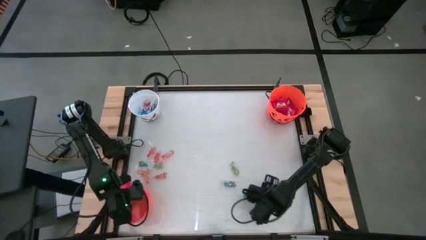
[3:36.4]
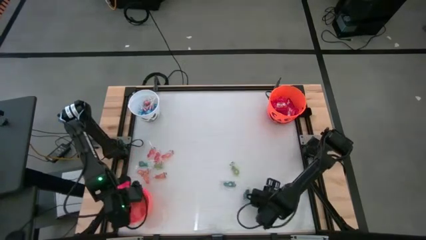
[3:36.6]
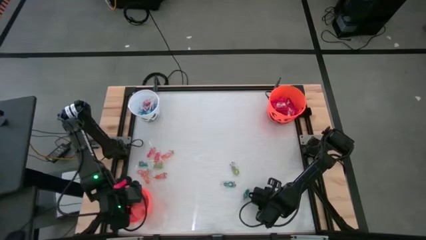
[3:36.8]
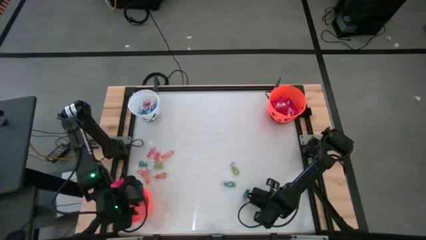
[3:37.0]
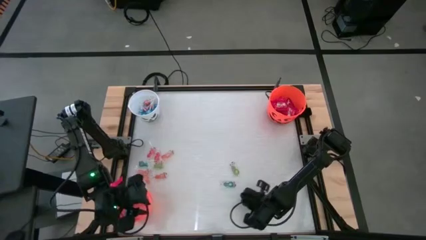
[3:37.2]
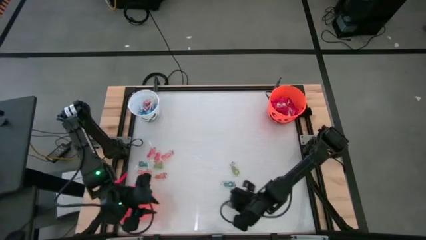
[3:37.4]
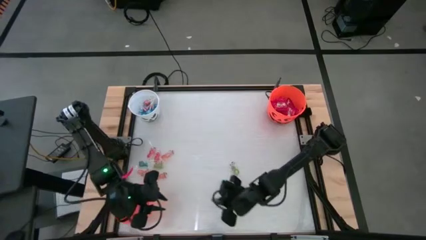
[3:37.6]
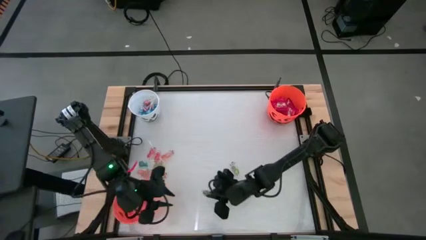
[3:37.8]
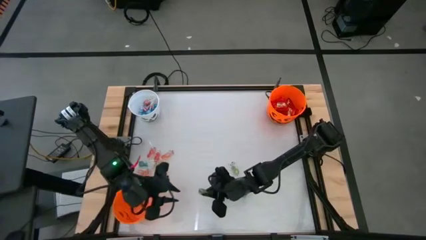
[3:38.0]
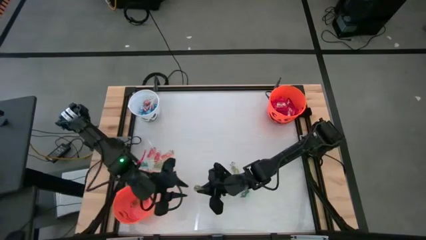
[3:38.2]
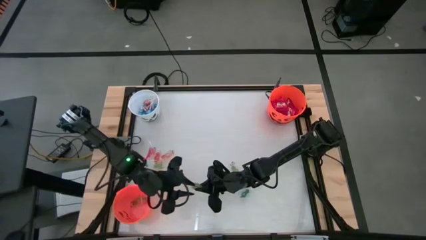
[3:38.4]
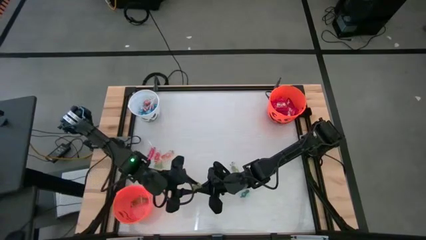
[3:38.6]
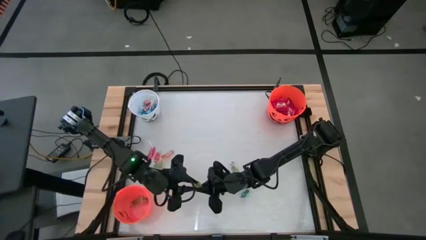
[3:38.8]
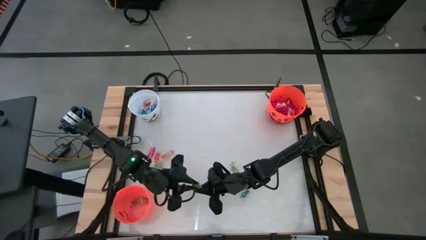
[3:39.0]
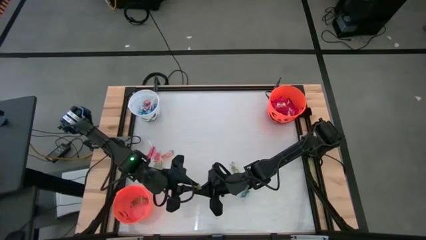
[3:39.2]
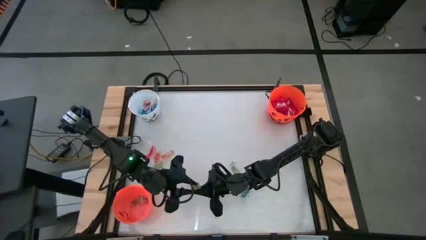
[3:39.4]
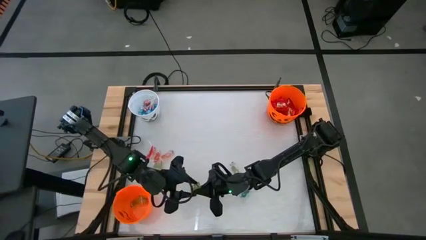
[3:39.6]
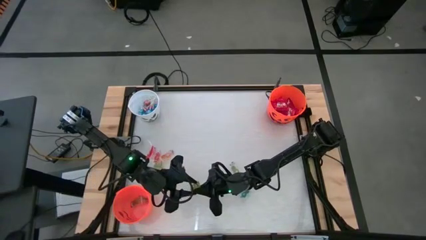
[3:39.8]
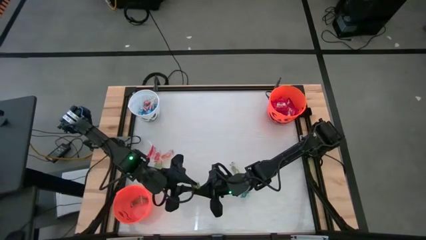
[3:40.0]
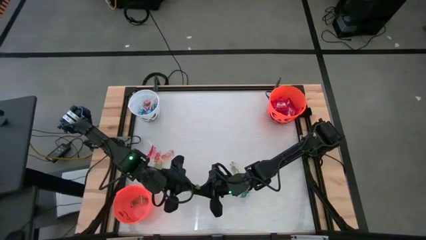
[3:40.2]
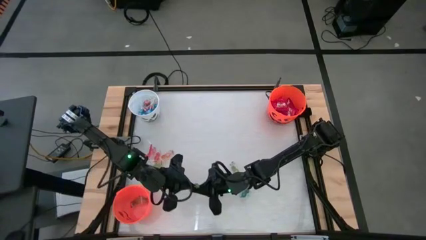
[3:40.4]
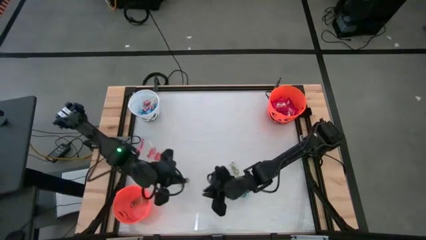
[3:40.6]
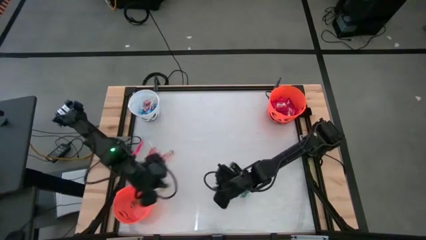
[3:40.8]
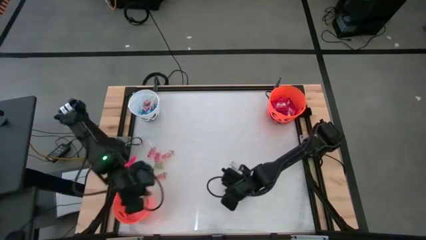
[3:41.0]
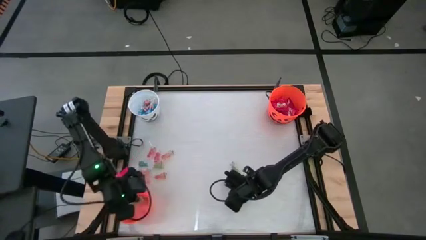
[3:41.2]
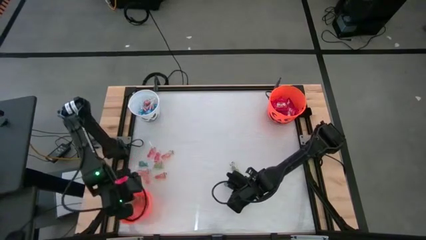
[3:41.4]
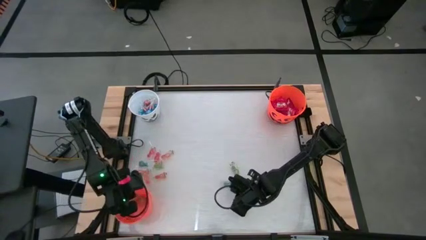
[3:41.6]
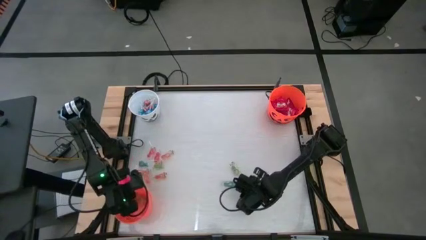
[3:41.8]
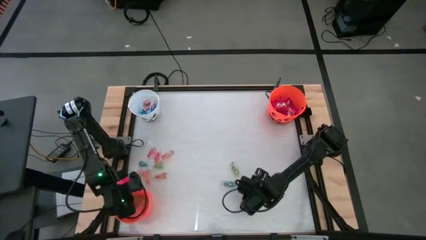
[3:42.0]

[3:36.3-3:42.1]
Task: Sort candy by brand, put in halloween buckets
Put the green gummy into the bottom orange bucket

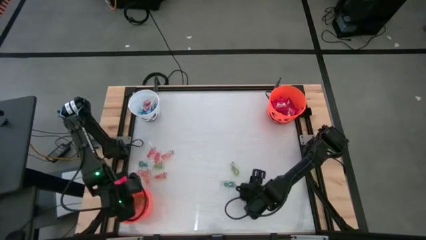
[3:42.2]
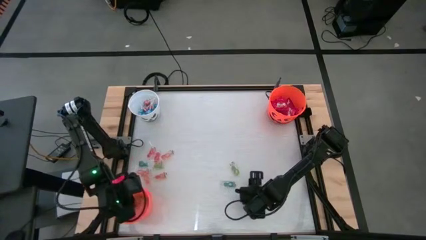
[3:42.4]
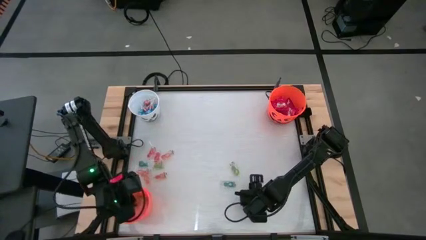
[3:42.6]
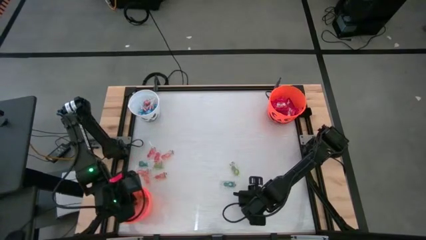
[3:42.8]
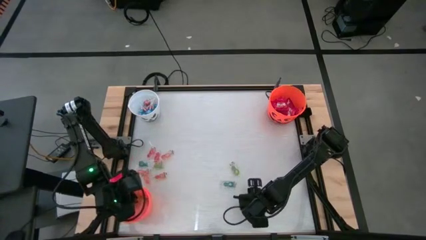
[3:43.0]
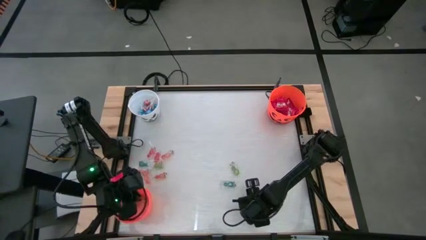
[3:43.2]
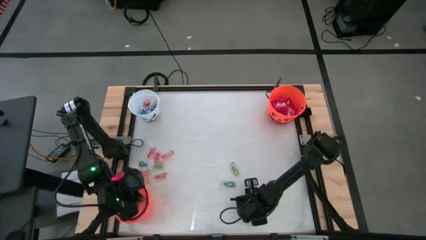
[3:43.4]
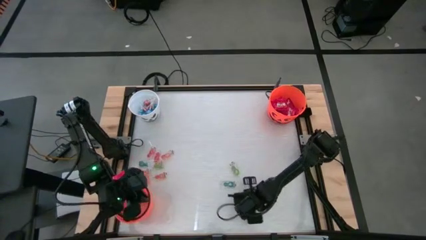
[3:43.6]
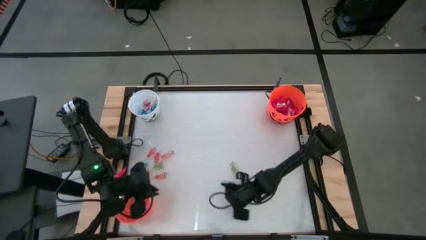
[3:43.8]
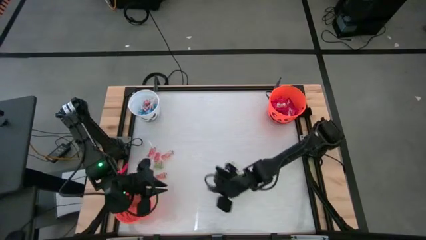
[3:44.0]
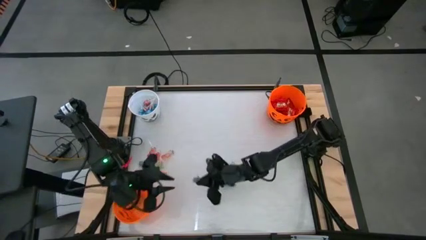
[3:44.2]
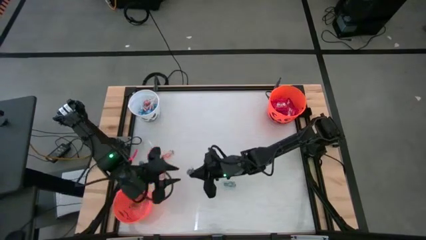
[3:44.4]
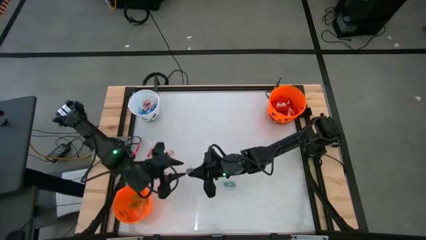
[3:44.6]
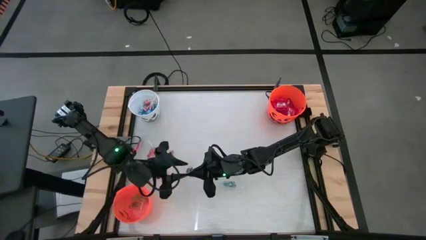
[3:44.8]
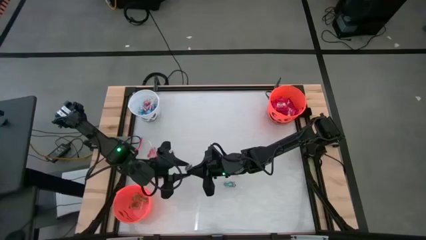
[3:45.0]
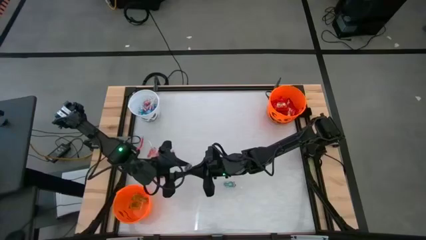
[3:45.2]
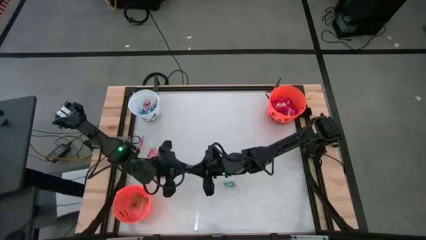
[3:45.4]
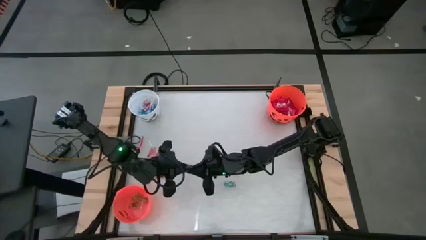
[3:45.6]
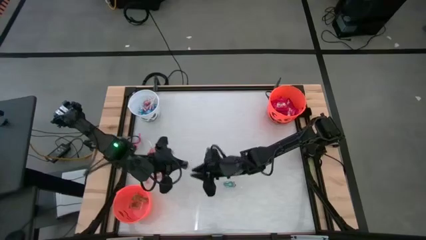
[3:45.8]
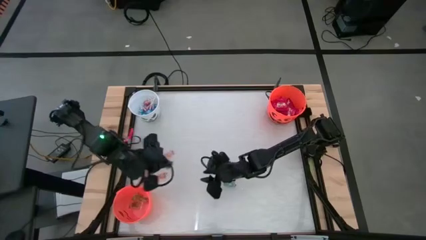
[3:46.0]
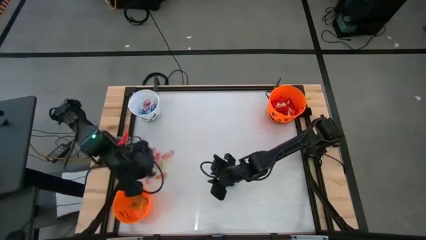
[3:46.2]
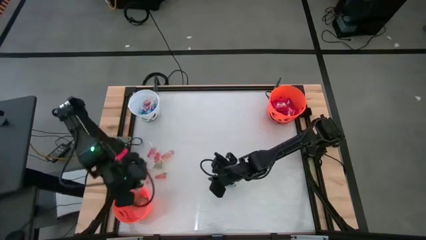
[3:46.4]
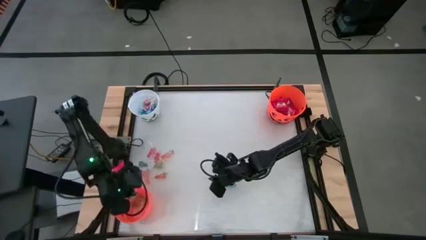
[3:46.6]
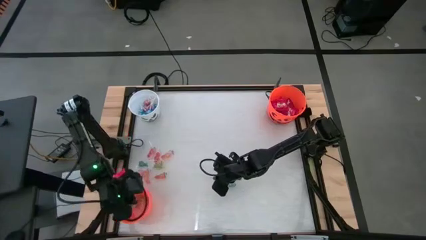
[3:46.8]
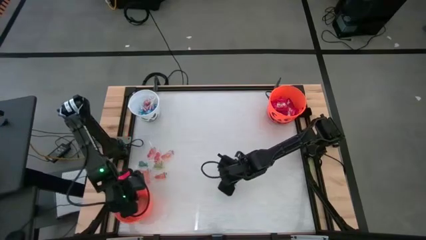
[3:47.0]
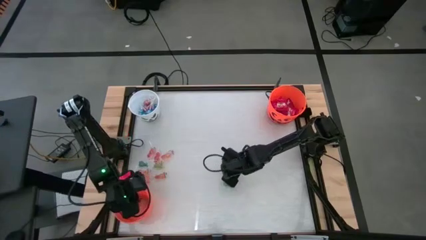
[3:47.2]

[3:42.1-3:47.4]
Put the blue gummy into the bottom orange bucket

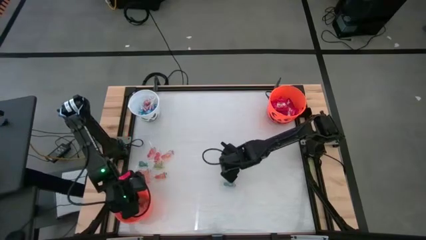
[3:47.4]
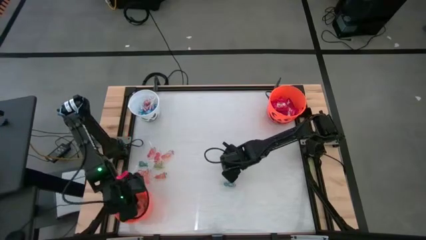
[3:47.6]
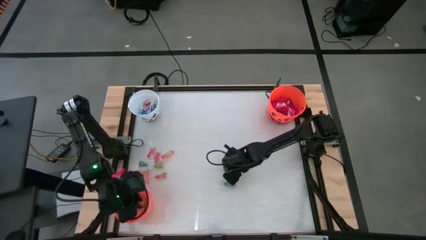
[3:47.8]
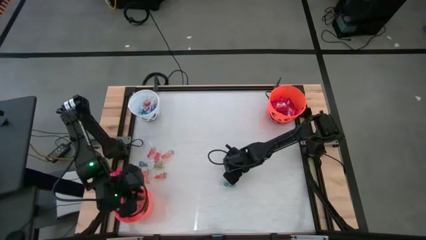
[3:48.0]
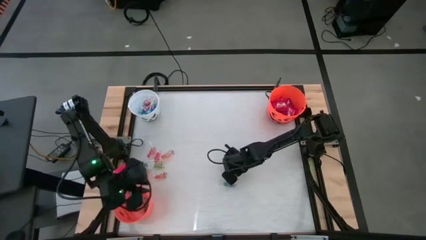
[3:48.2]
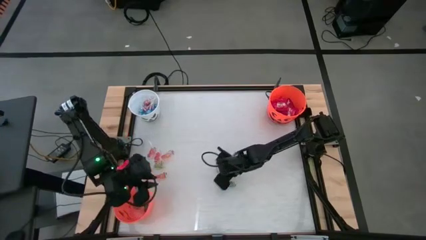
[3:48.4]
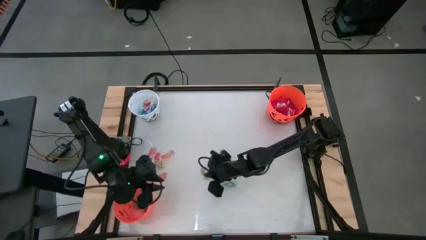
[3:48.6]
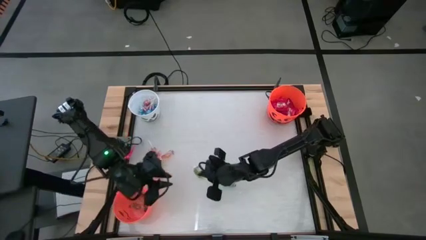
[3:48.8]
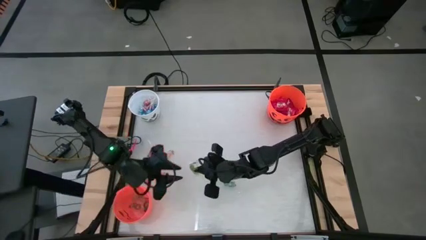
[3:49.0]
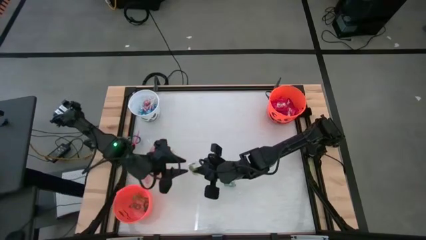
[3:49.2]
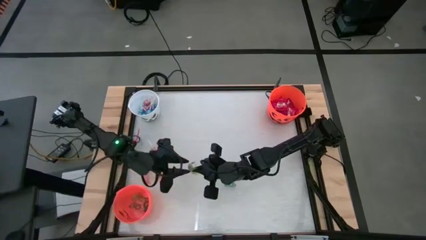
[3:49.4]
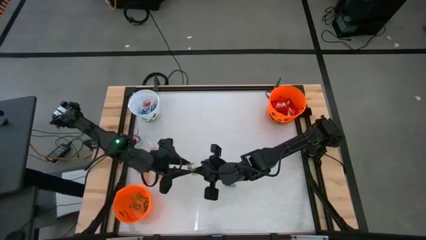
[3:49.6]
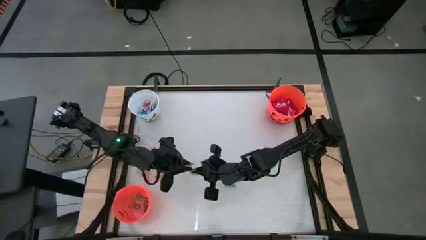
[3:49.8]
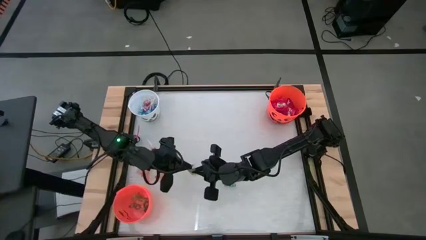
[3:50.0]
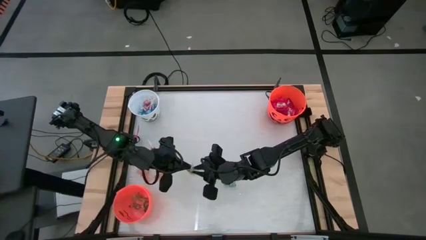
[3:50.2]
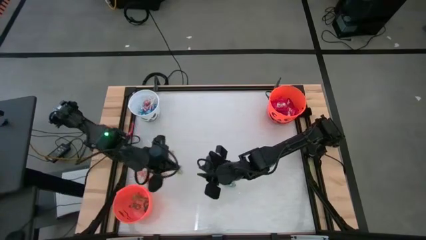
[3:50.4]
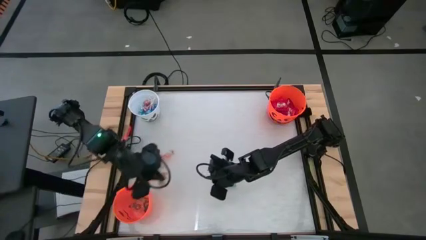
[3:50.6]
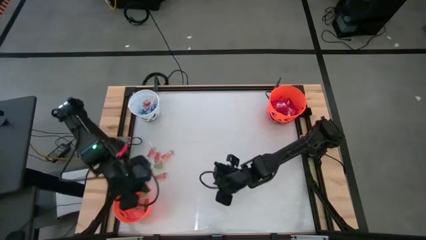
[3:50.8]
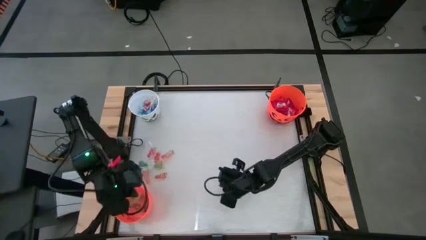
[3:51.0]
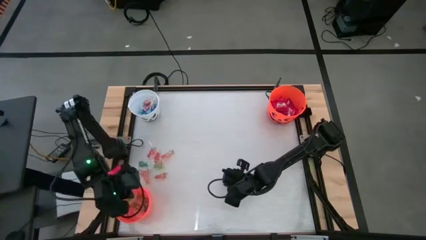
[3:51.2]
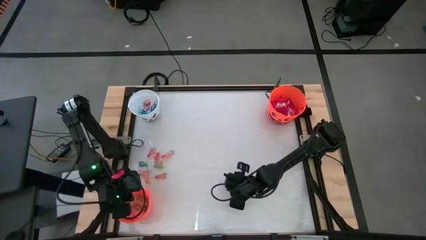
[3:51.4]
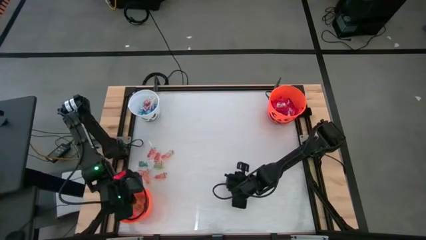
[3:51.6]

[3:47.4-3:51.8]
Put the green gummy into the bottom orange bucket
